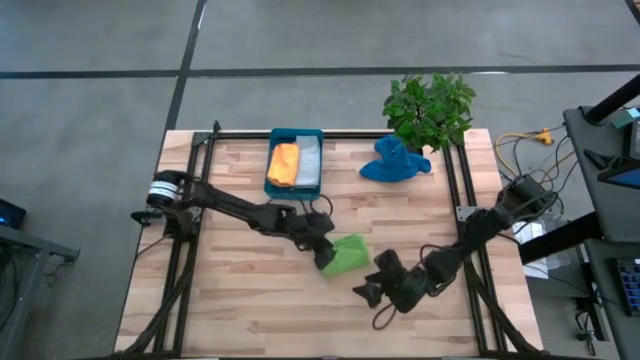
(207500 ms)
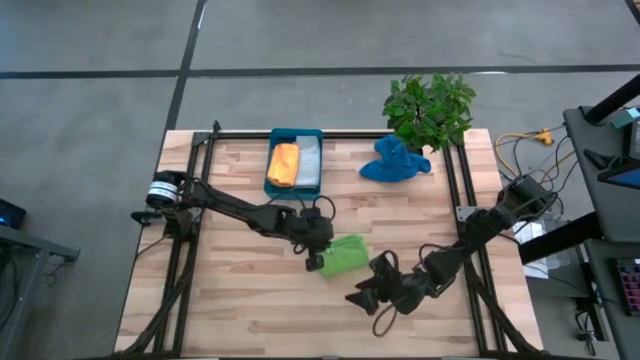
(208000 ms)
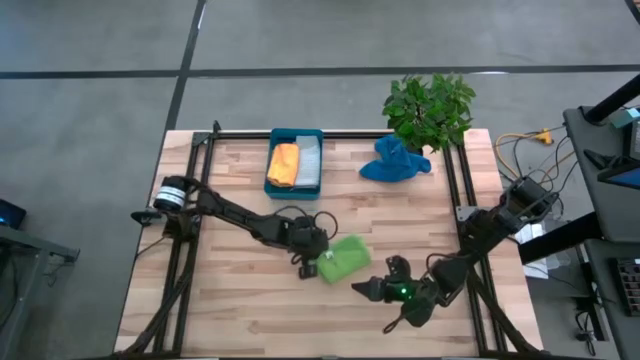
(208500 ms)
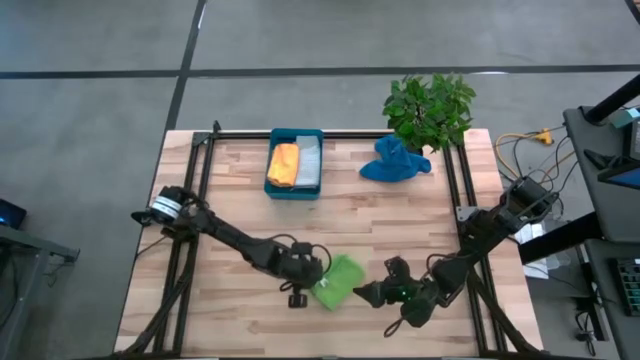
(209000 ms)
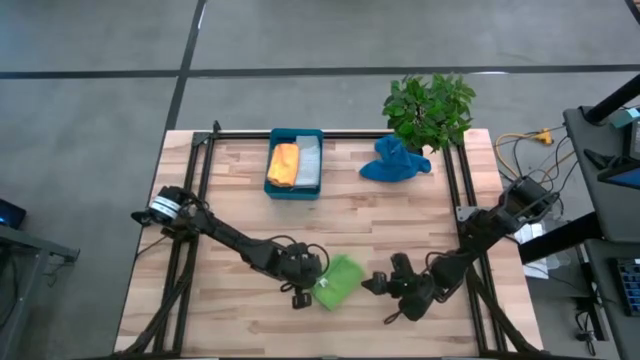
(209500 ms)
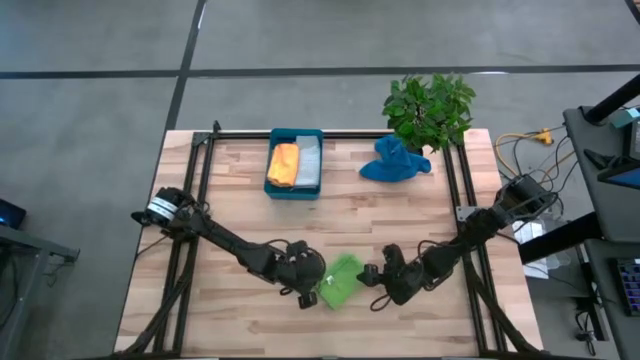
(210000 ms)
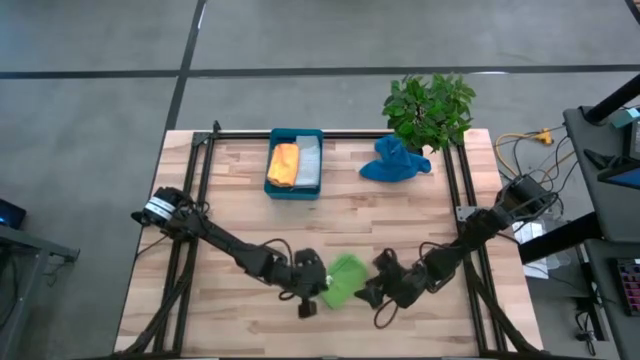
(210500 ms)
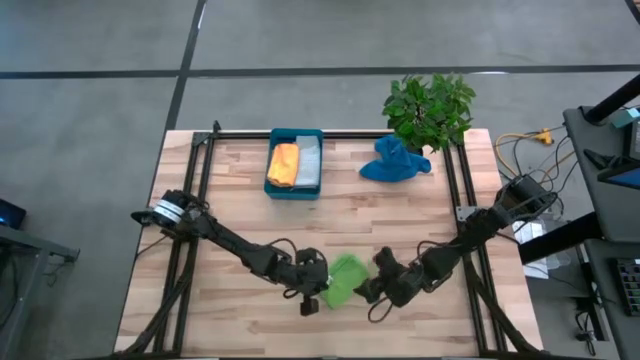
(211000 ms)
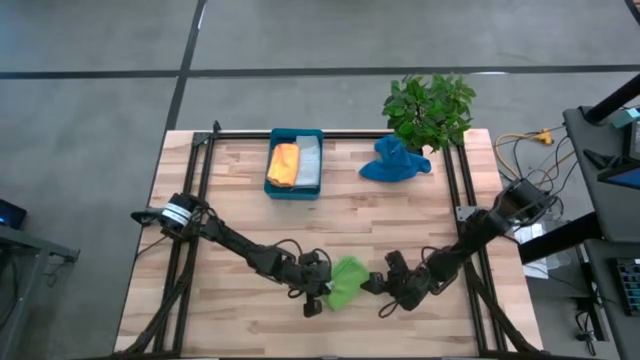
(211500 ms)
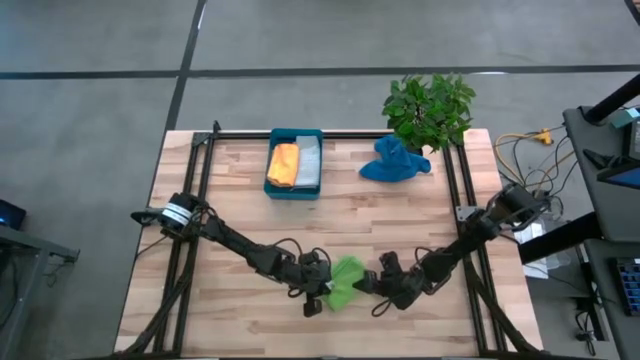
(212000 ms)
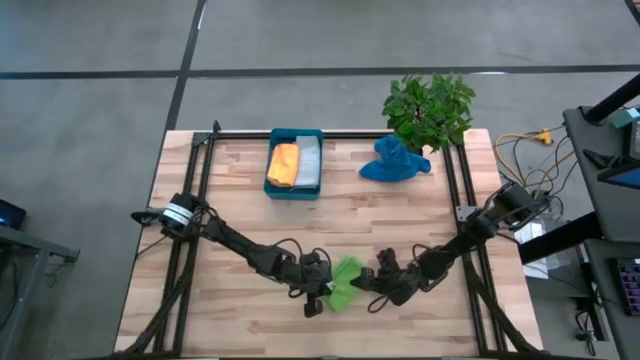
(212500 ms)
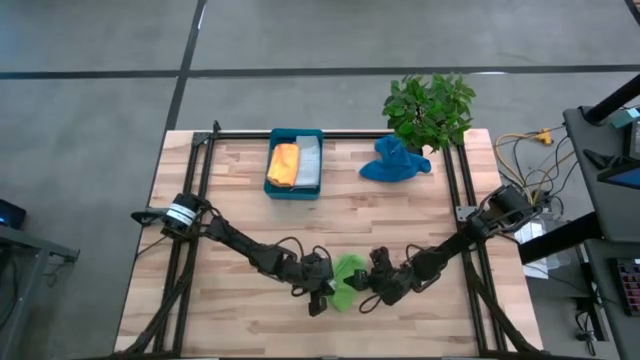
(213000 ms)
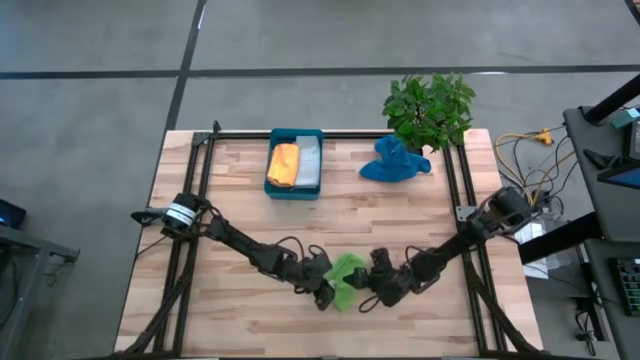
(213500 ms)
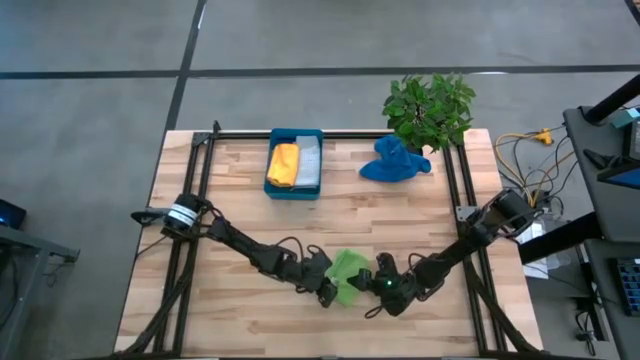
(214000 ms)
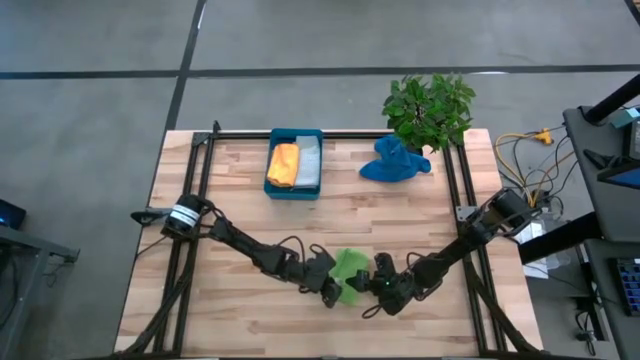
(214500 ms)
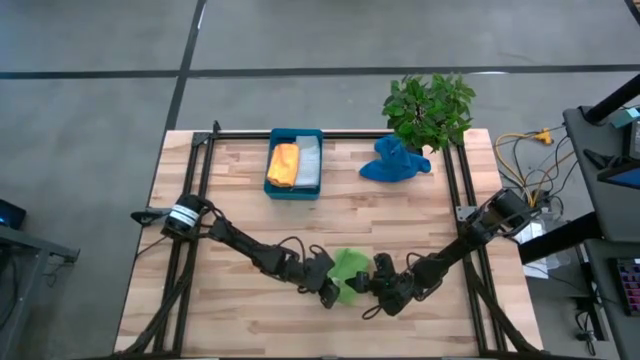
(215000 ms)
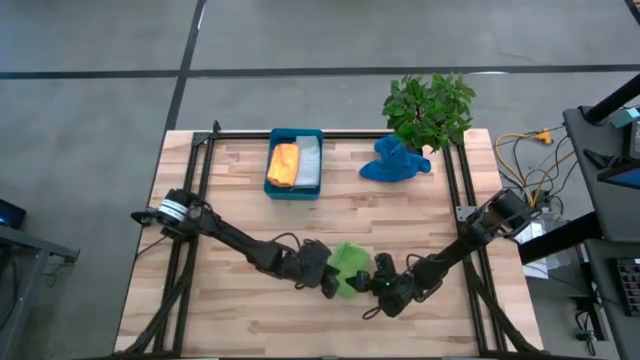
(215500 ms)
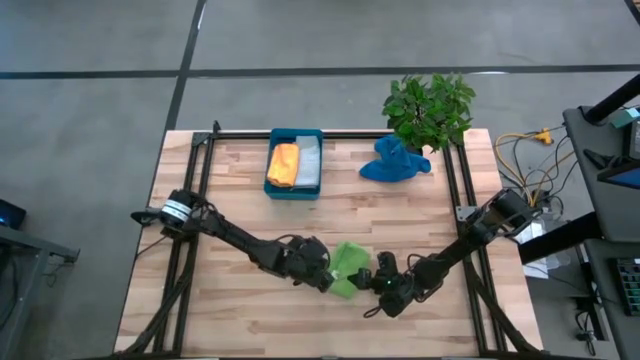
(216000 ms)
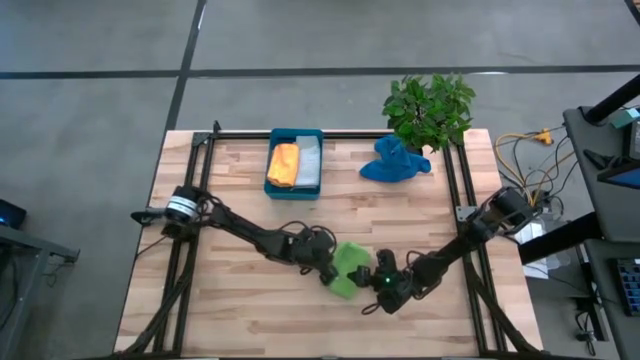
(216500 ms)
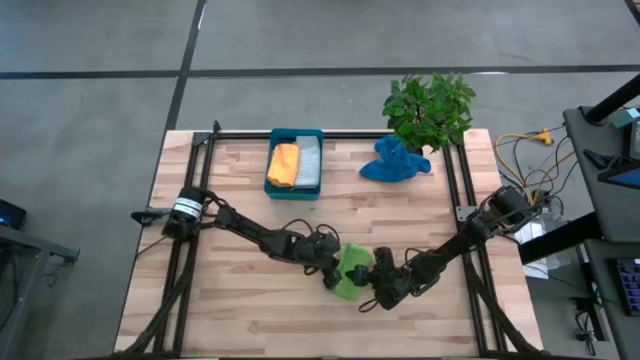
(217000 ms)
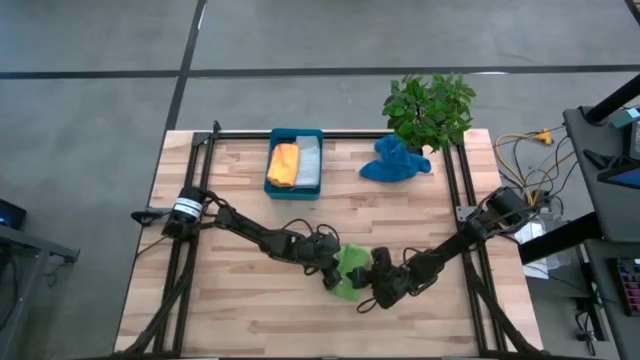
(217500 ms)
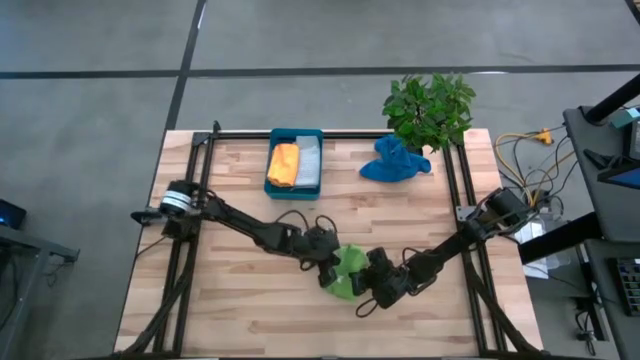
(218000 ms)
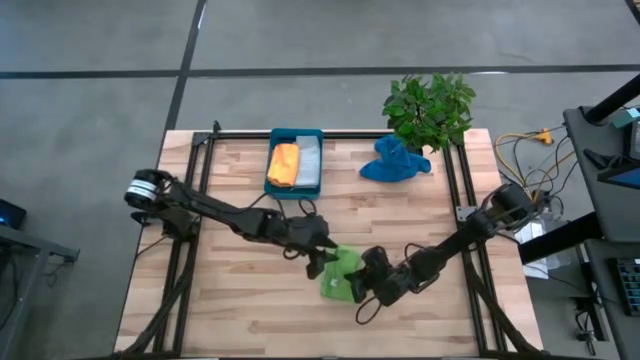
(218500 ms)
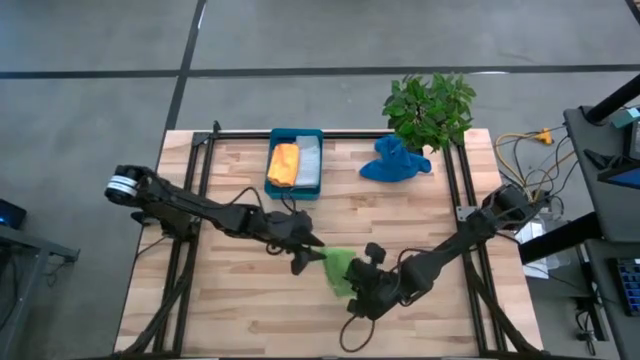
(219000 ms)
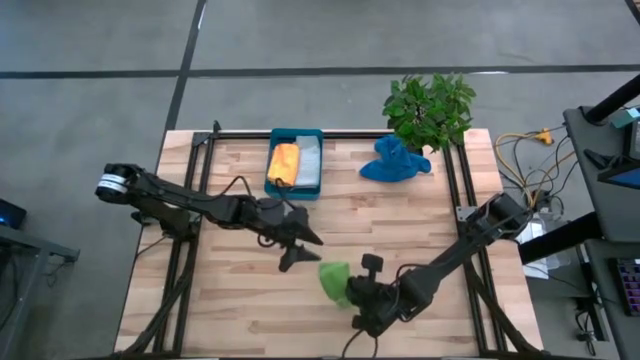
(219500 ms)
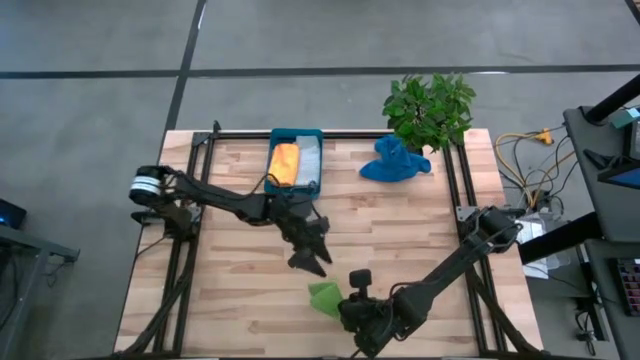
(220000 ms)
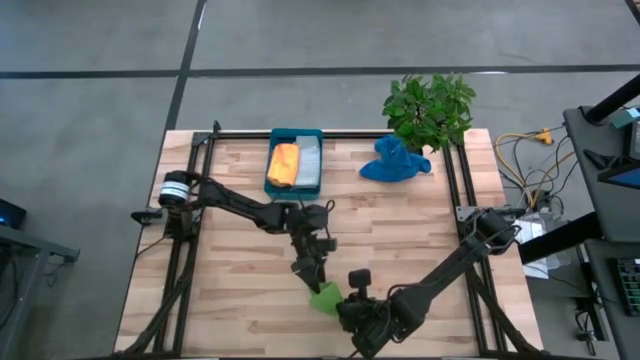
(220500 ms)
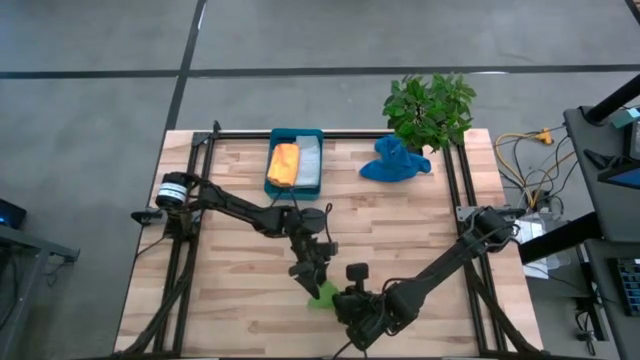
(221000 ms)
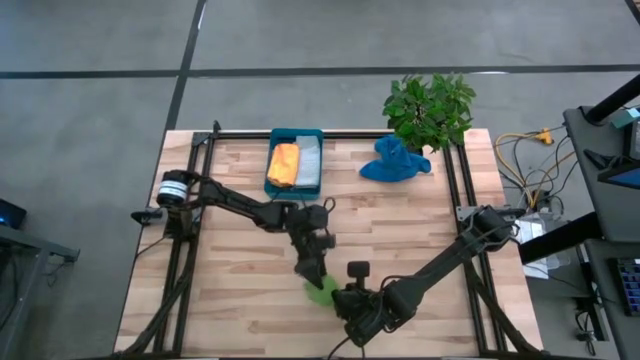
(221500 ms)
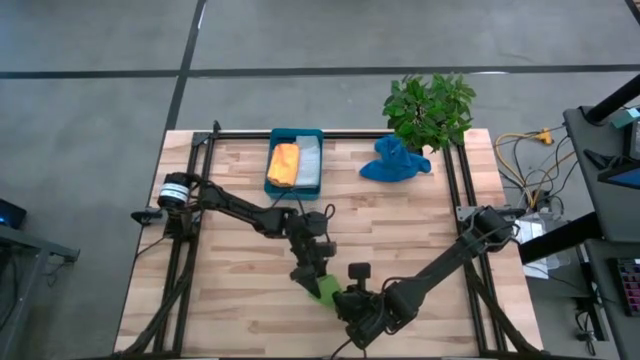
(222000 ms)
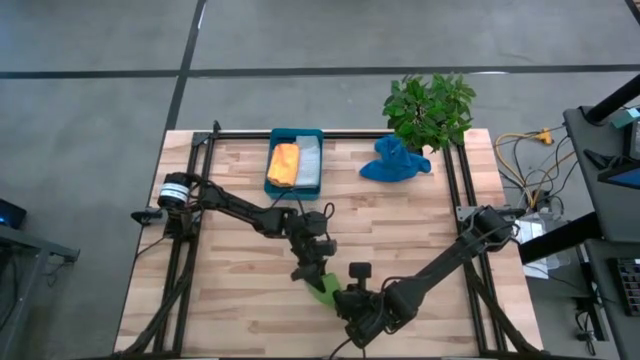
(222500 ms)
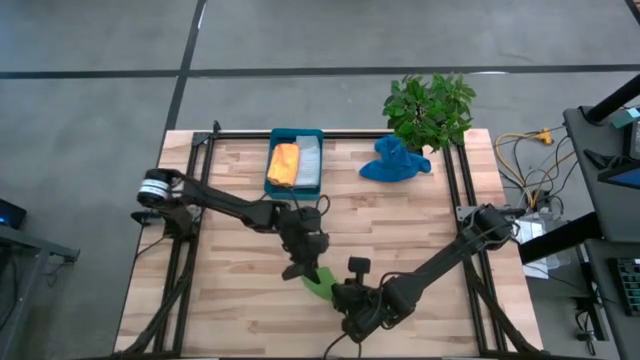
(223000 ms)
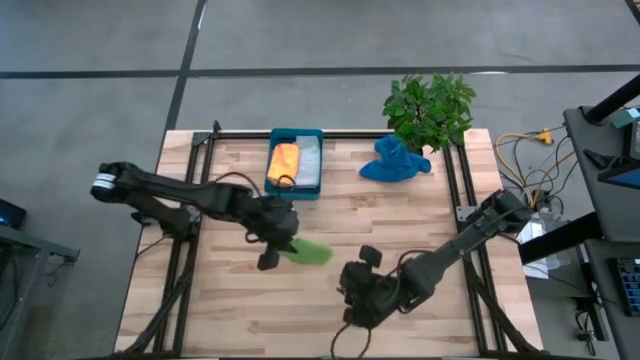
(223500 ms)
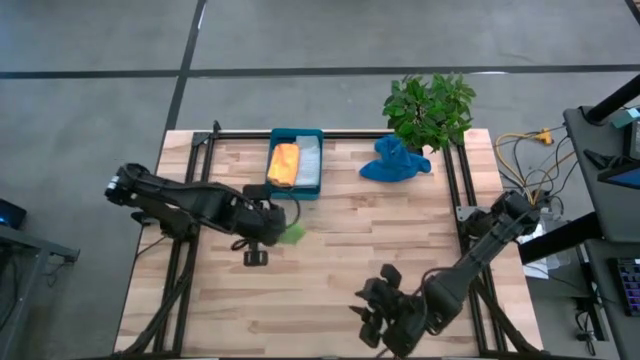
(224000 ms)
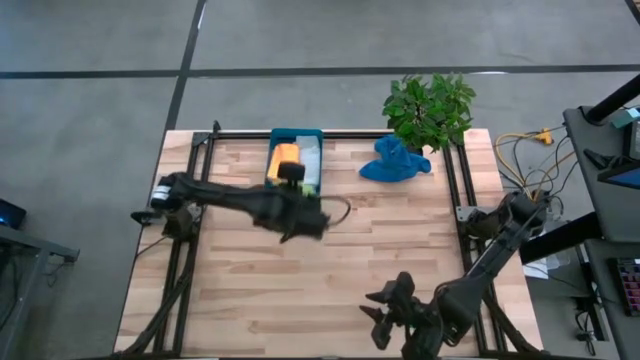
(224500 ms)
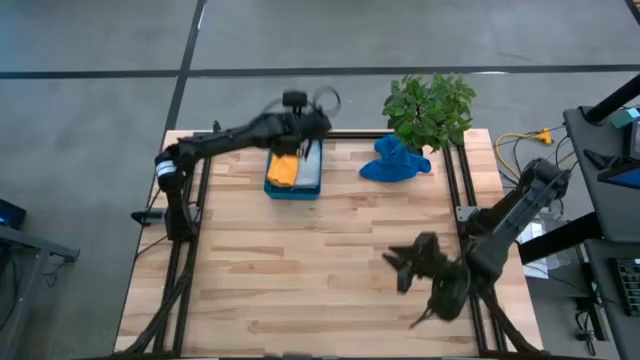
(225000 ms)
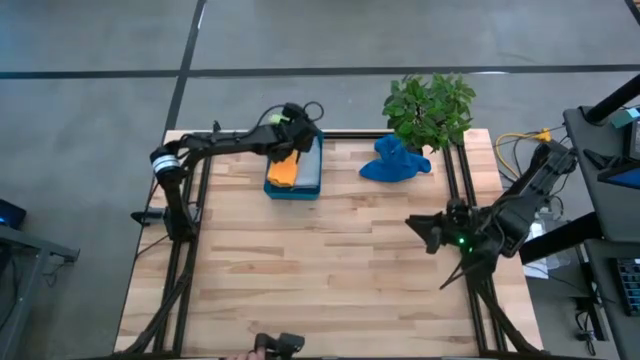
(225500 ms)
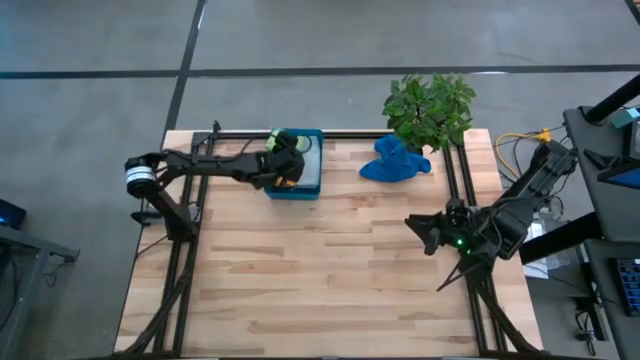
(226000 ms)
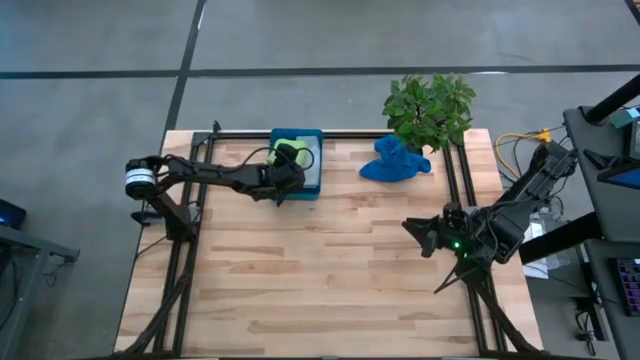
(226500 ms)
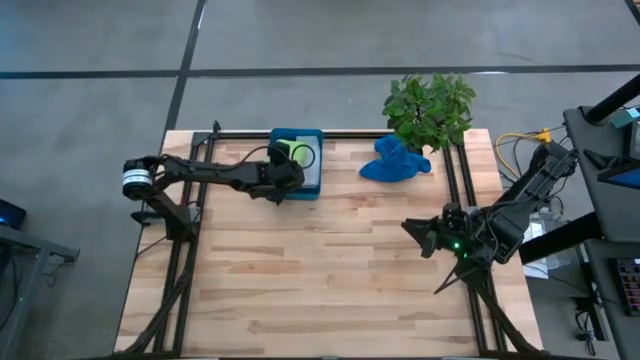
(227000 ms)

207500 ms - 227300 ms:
Task: Fold microfiber towels
Put the green microfiber cloth into the blue bin
